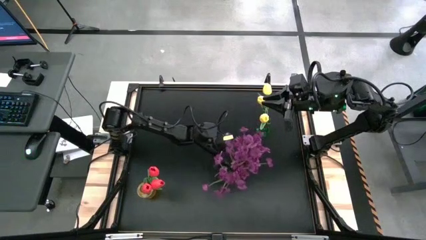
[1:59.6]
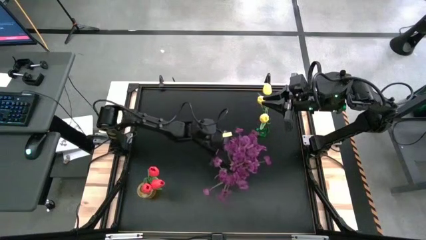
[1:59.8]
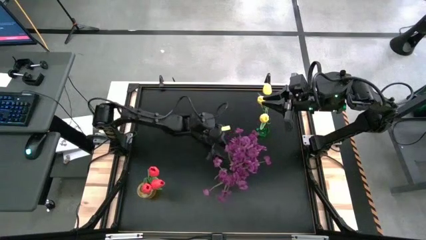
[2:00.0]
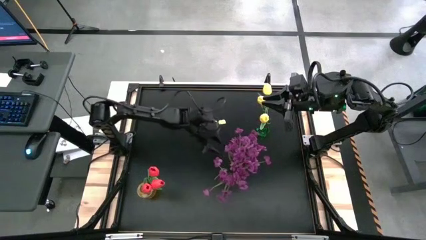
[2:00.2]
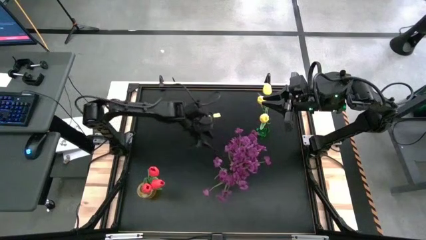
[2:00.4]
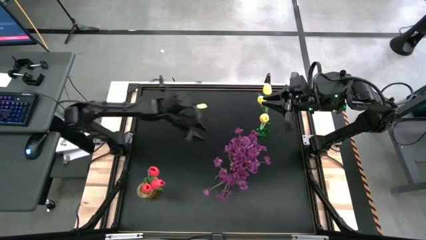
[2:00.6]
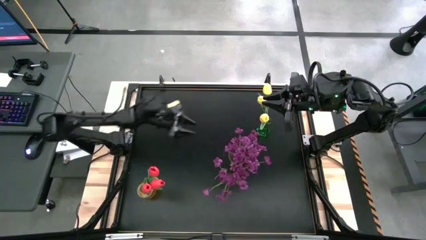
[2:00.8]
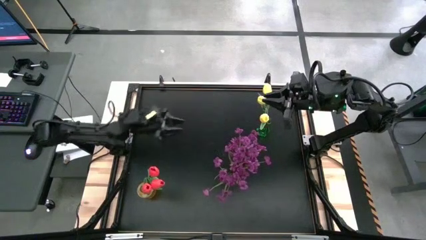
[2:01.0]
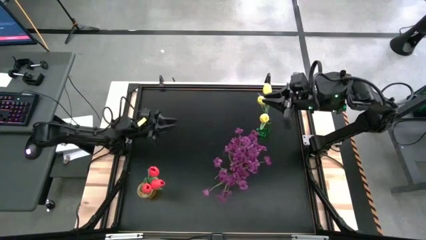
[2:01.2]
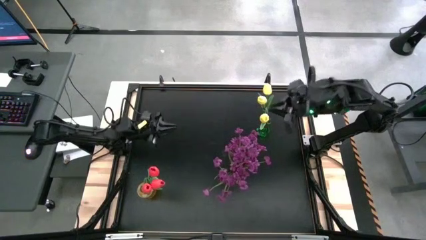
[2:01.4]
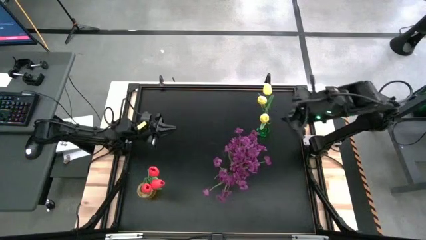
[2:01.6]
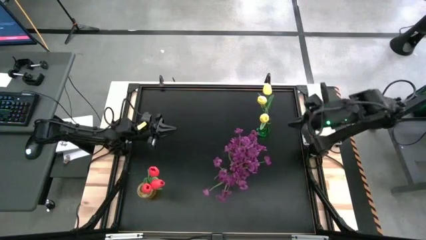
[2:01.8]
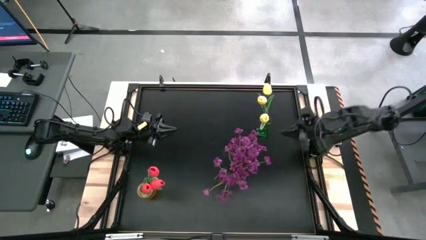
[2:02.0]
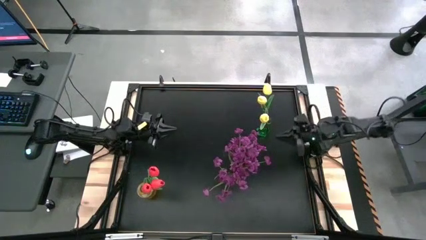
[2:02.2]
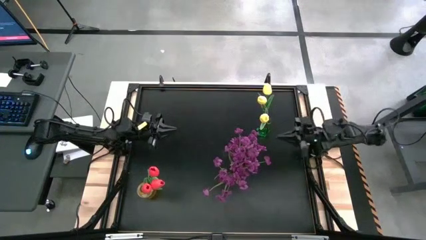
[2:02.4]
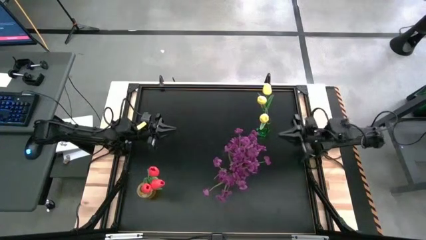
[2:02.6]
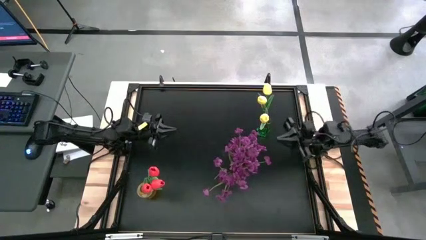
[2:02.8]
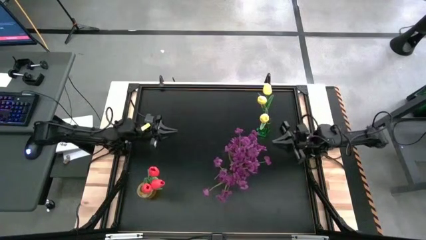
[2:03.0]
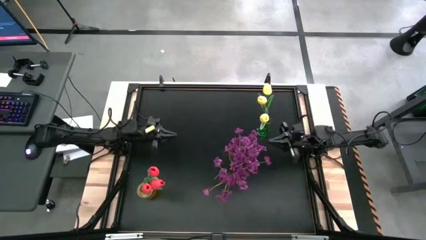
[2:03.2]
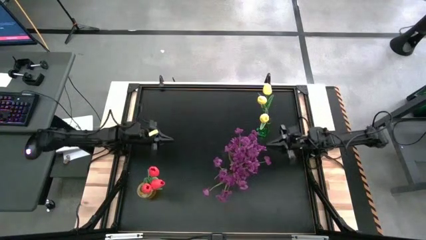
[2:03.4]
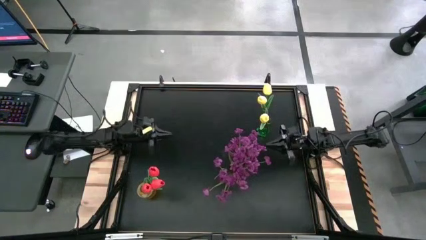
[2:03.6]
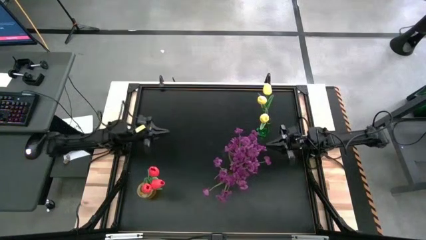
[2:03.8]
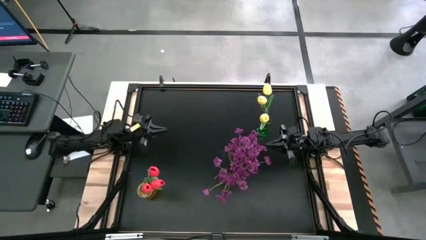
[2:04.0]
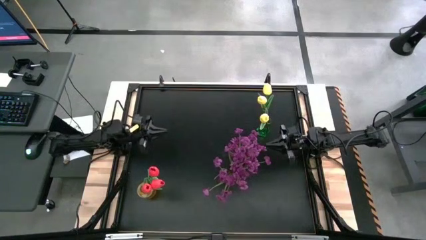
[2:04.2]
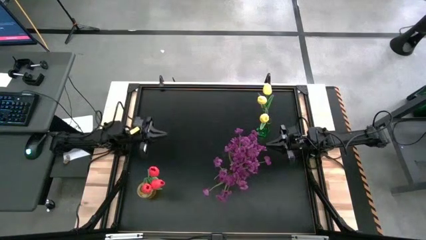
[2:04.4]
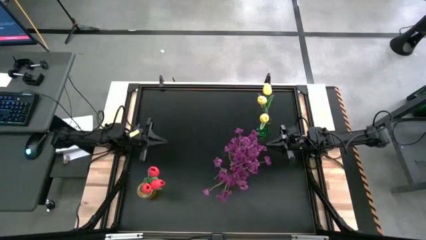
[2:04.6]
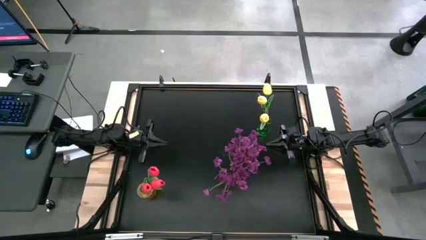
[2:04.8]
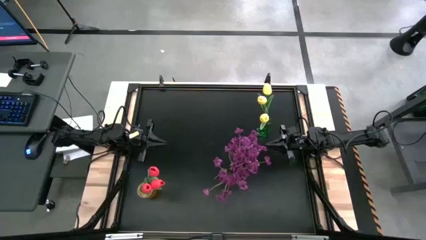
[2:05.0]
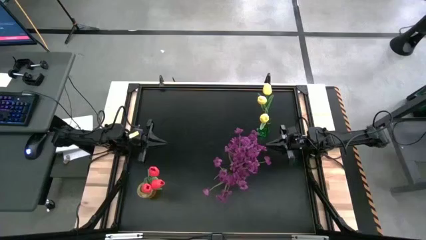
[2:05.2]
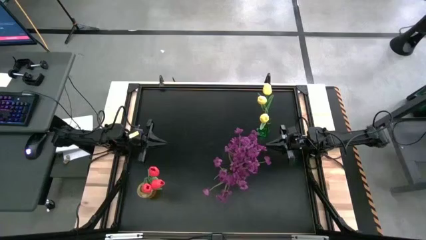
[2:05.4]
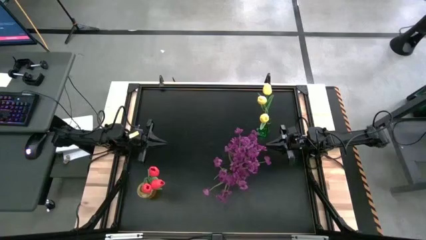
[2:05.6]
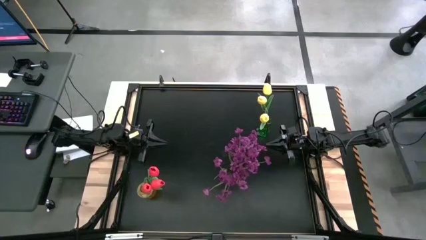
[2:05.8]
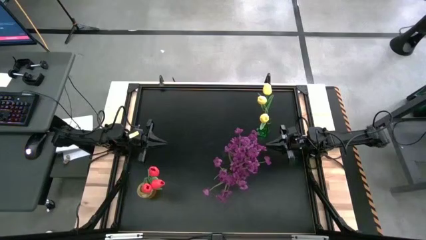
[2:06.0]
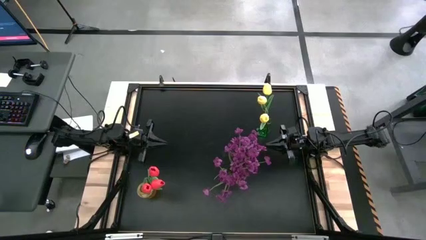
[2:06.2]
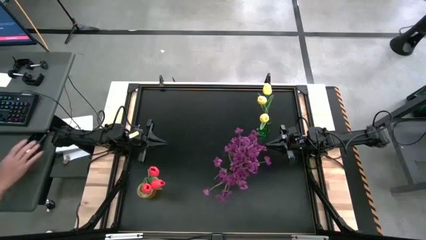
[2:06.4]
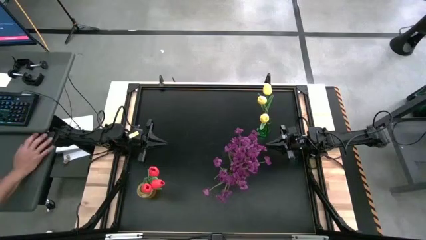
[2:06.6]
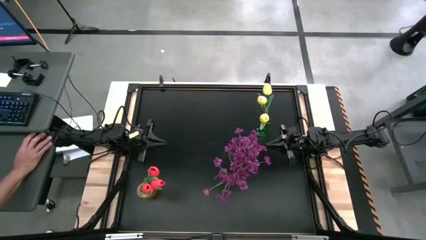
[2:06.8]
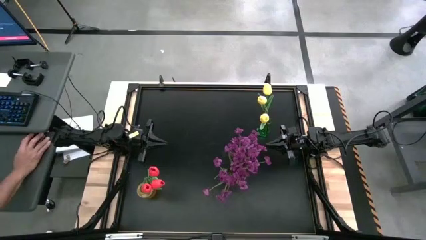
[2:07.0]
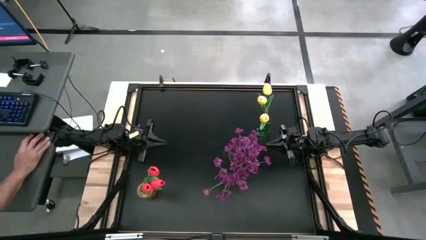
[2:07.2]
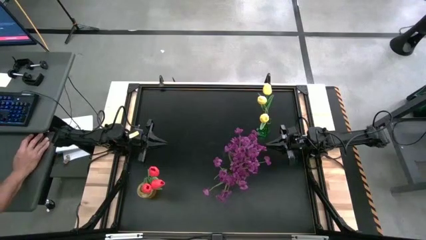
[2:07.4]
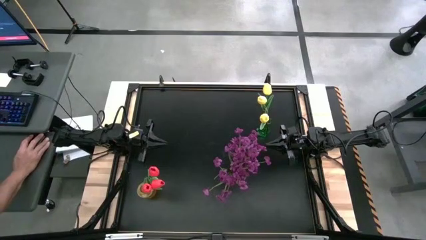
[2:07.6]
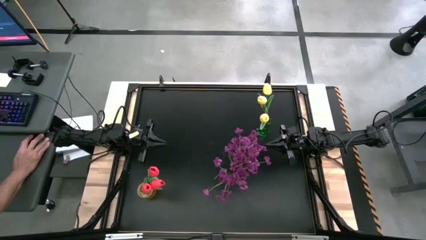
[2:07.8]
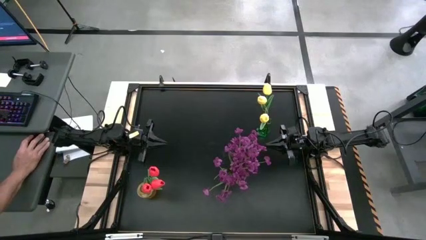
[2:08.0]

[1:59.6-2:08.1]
Task: Sort flowers into vase by color
Return to Home Position
